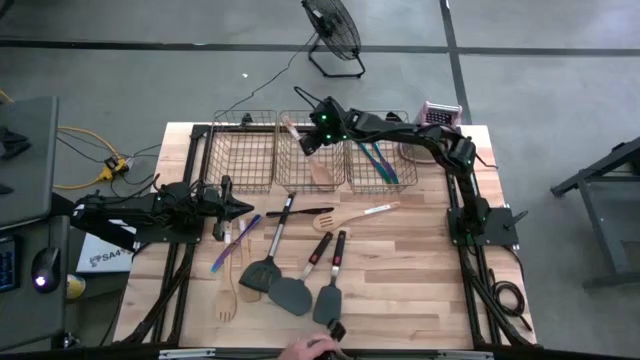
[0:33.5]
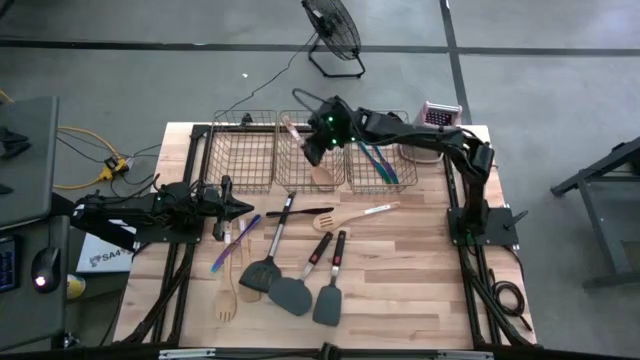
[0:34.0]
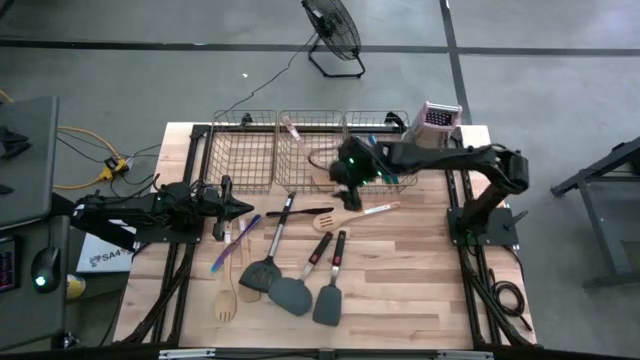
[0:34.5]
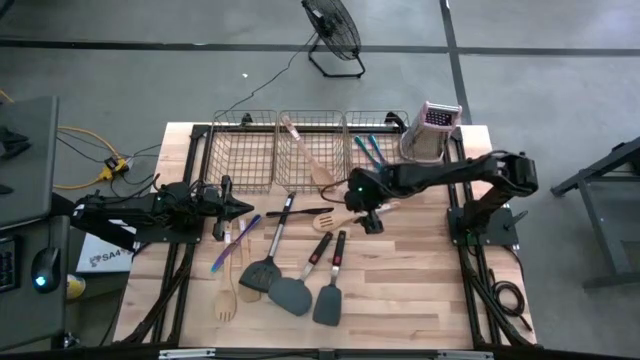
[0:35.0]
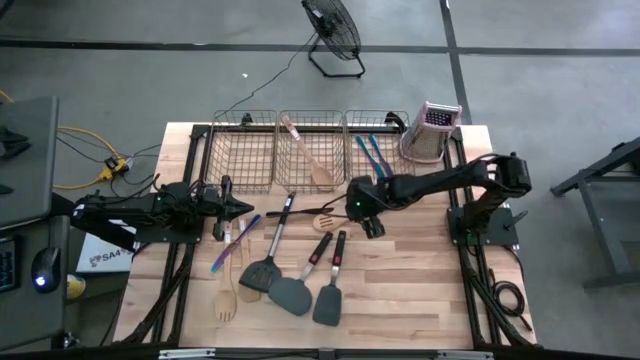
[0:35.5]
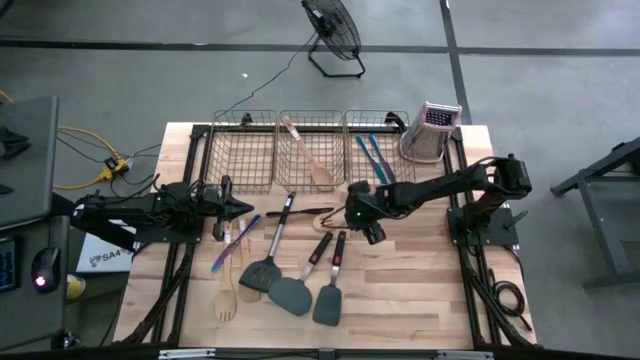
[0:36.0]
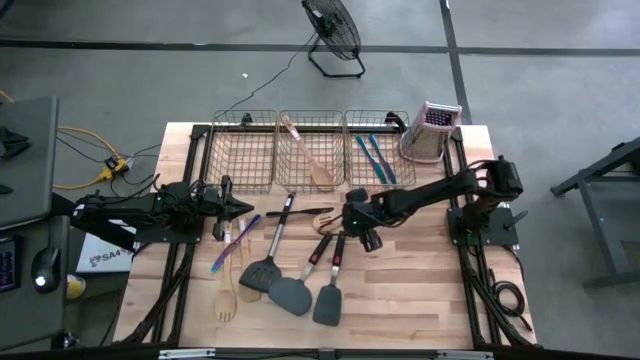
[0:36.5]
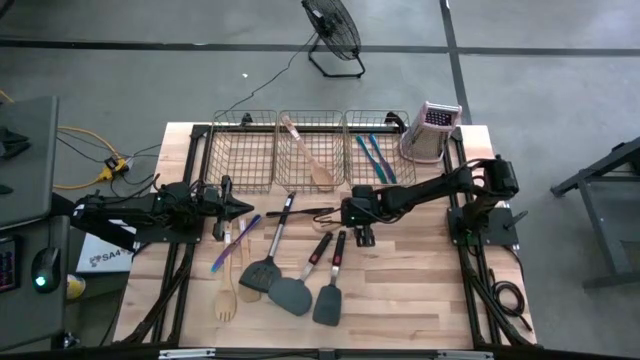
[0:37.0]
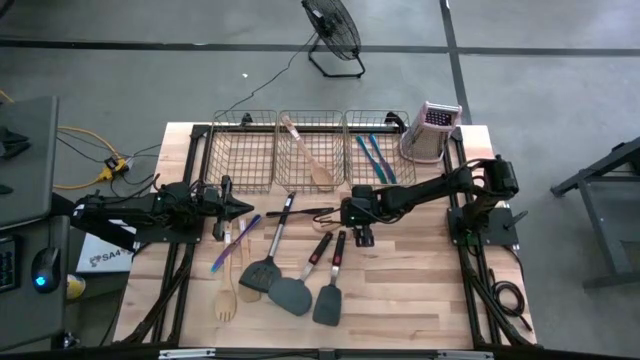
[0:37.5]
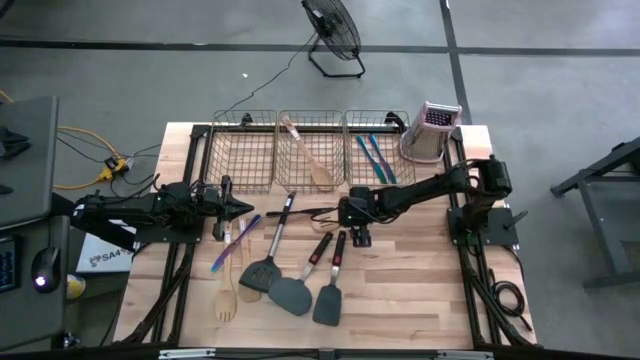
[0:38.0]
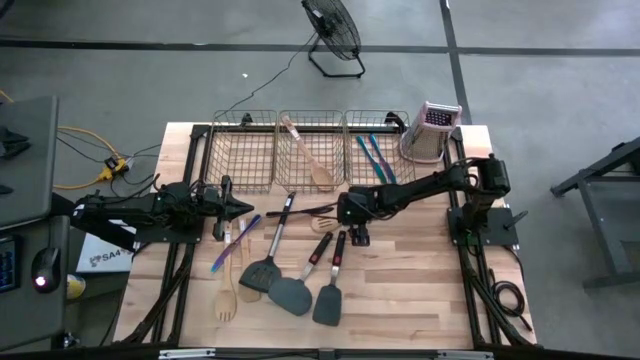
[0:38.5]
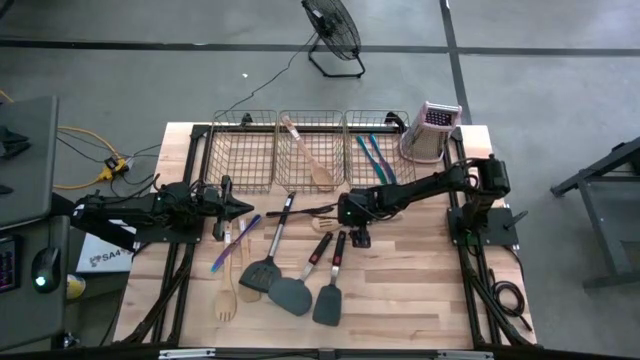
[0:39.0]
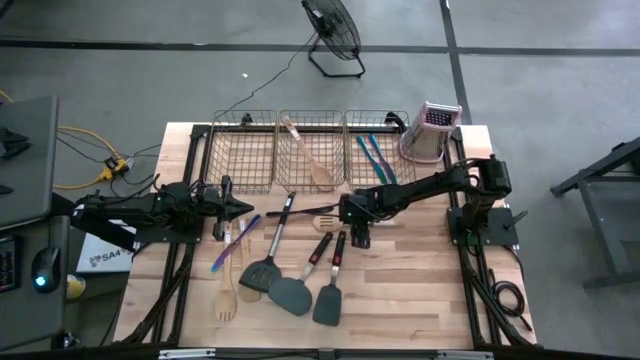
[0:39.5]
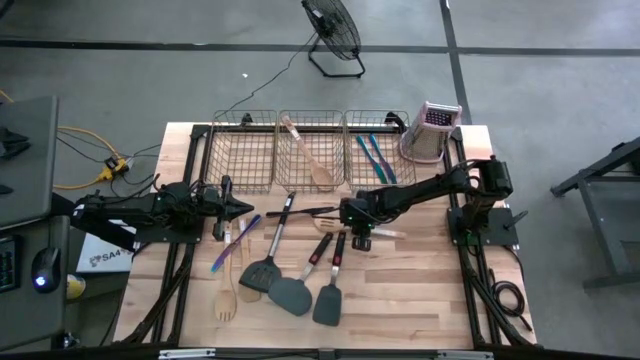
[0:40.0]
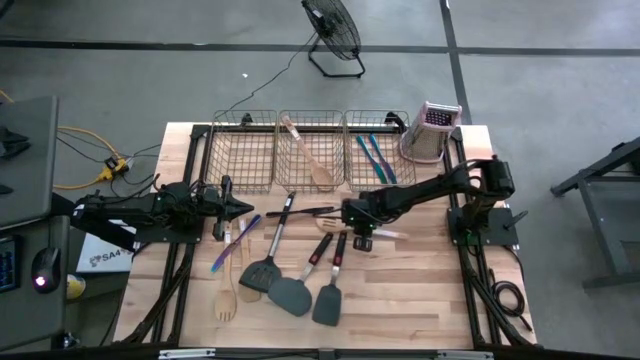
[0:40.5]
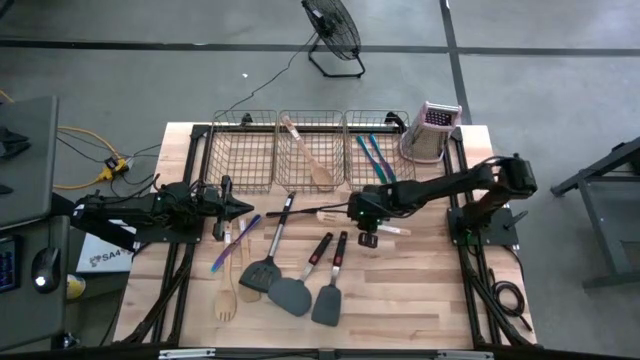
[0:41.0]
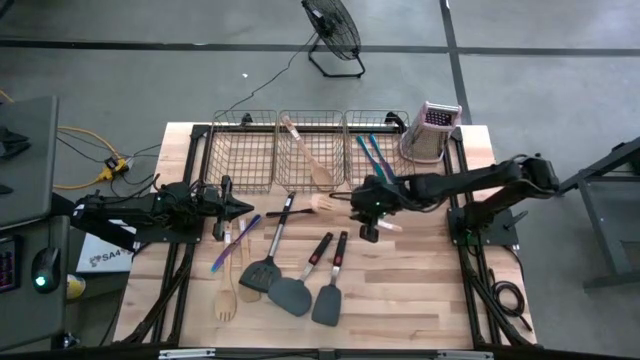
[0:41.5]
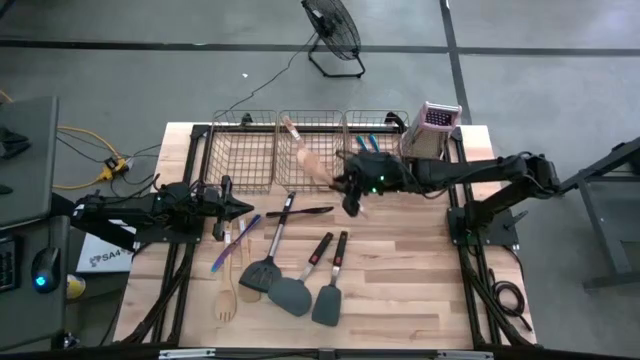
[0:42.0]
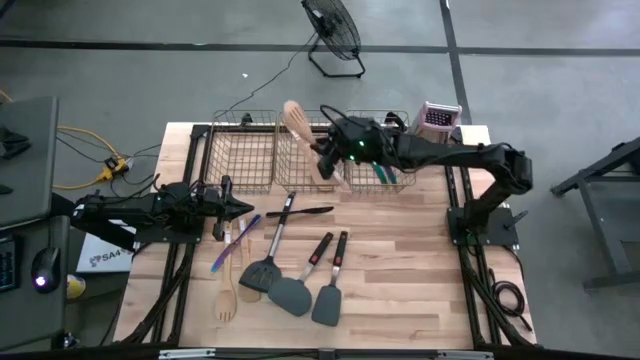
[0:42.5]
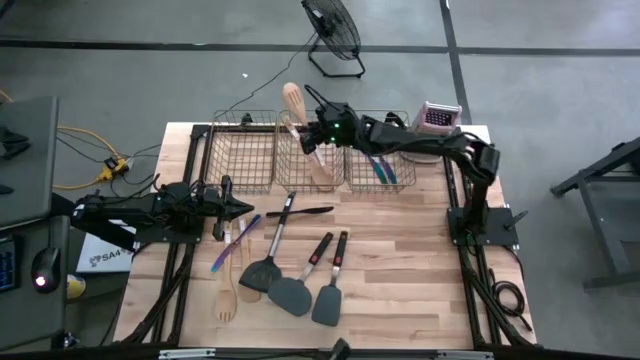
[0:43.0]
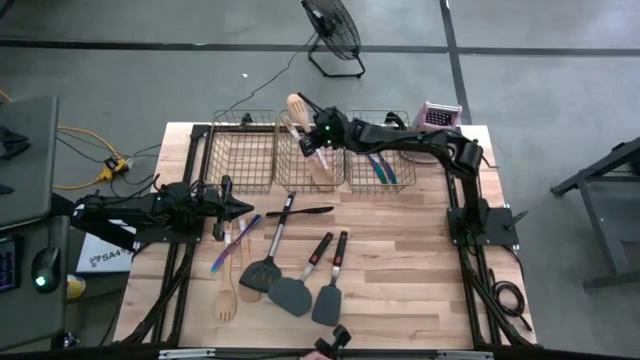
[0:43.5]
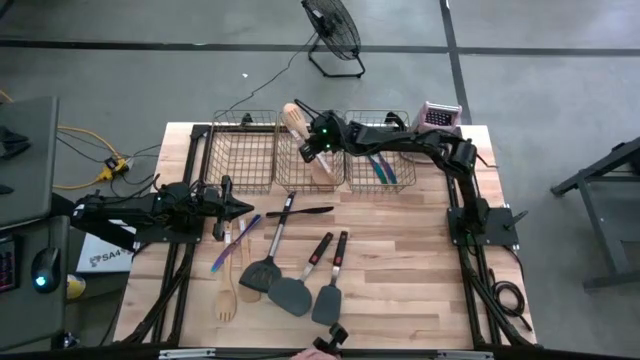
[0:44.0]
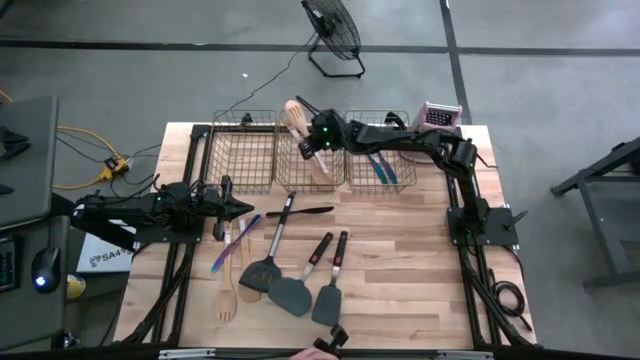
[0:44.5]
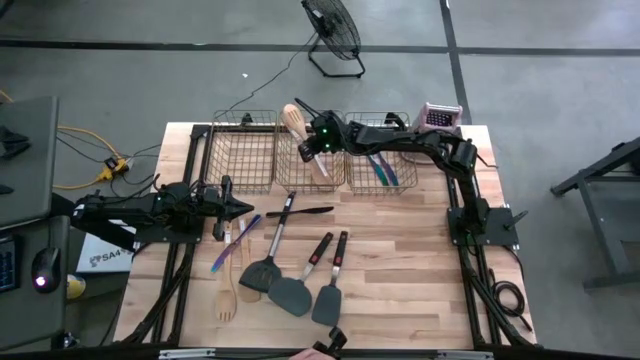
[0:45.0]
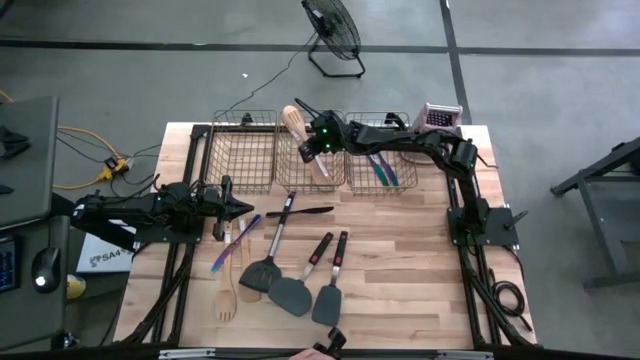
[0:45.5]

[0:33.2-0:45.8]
Task: Pick & Place Kitchen Items
Put the brown serving spoon into the middle wire basket

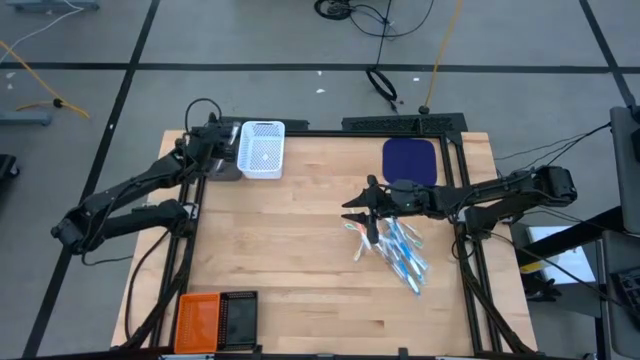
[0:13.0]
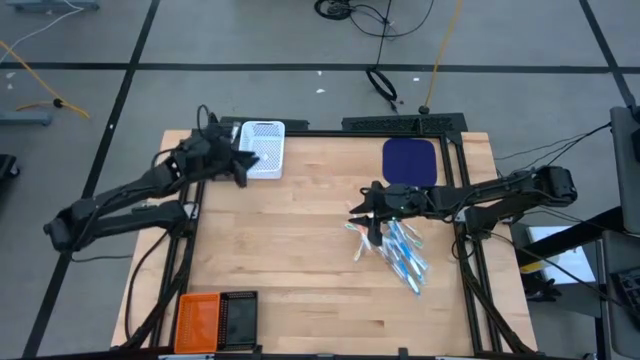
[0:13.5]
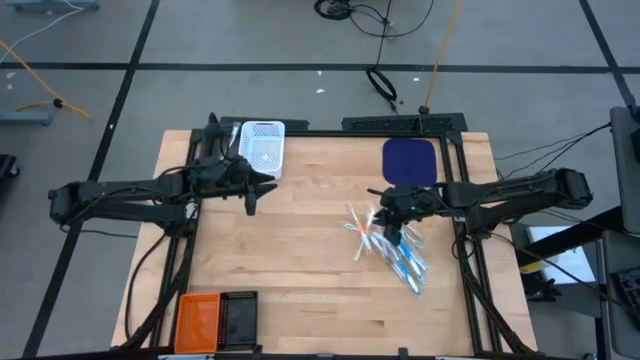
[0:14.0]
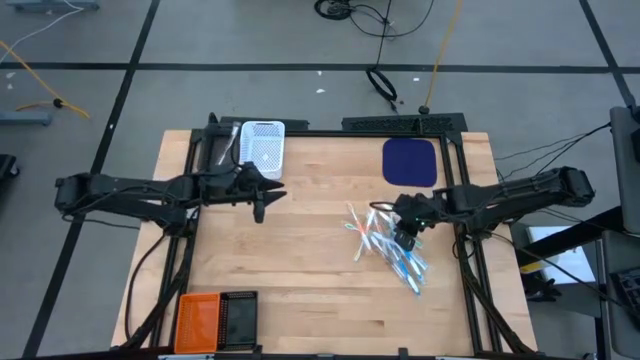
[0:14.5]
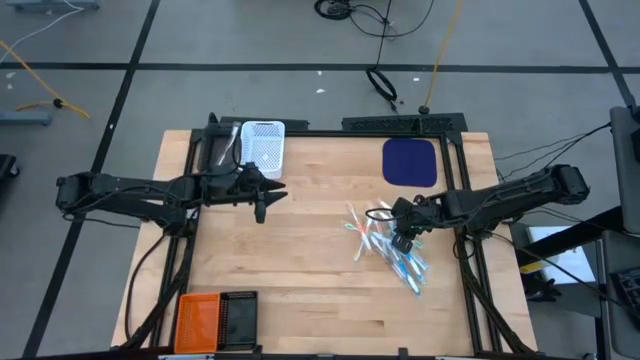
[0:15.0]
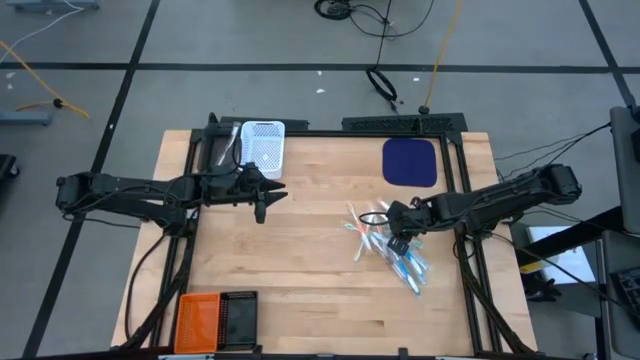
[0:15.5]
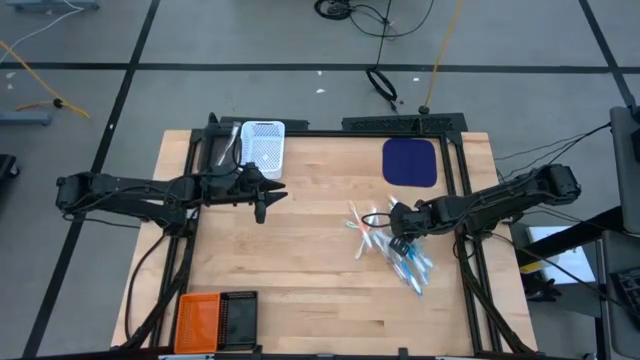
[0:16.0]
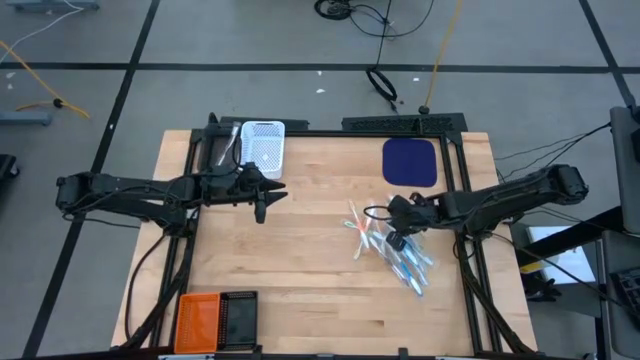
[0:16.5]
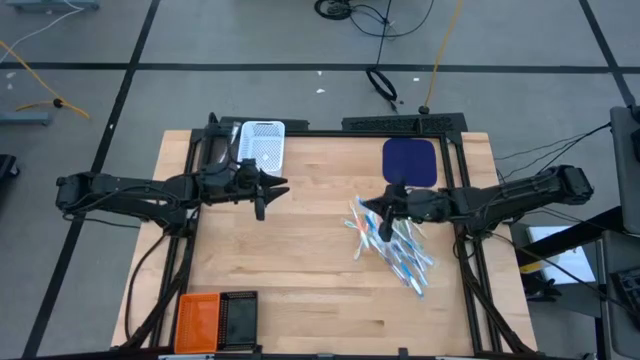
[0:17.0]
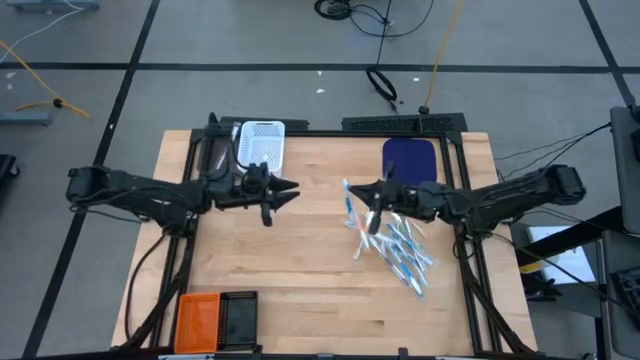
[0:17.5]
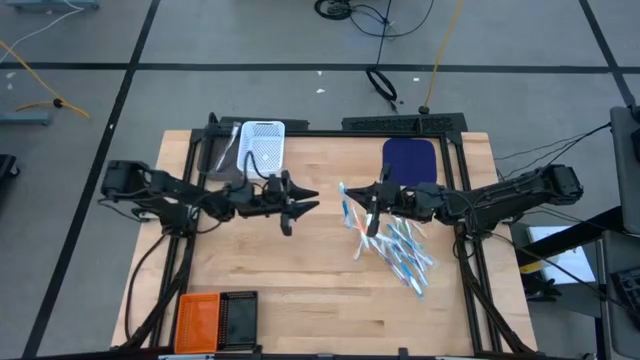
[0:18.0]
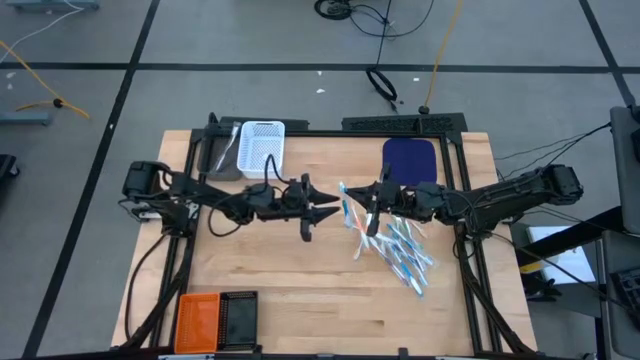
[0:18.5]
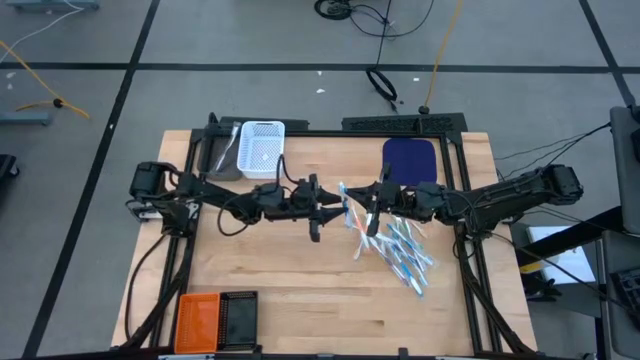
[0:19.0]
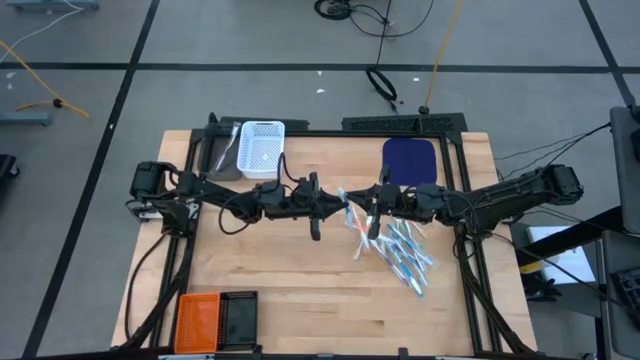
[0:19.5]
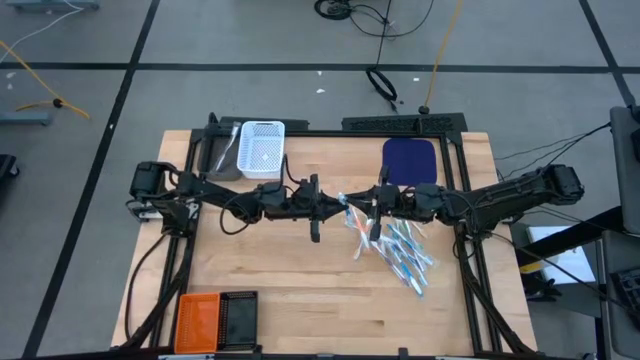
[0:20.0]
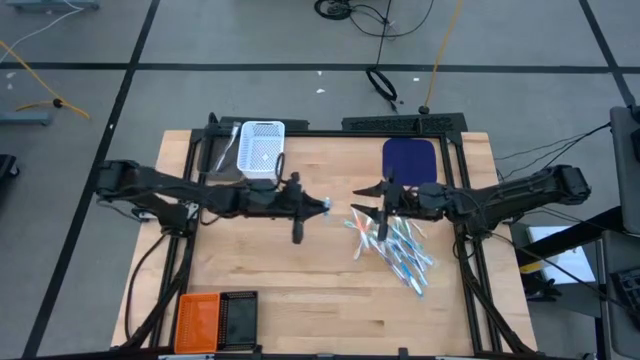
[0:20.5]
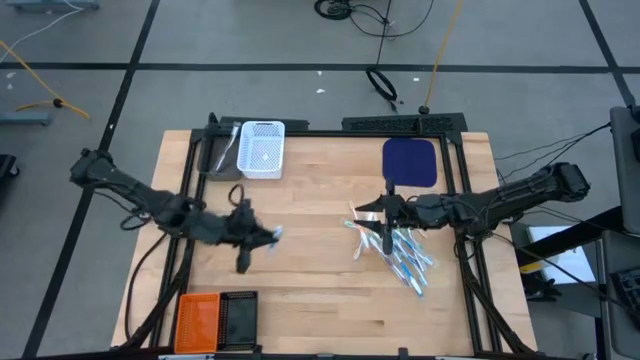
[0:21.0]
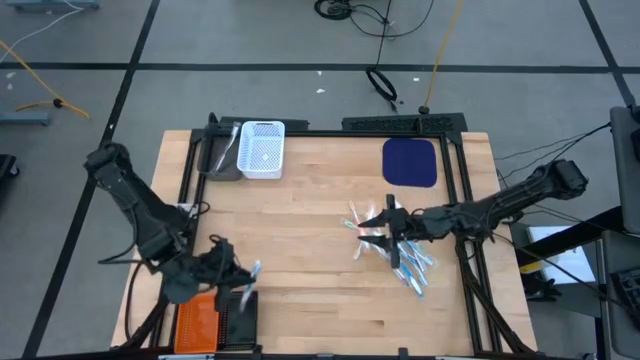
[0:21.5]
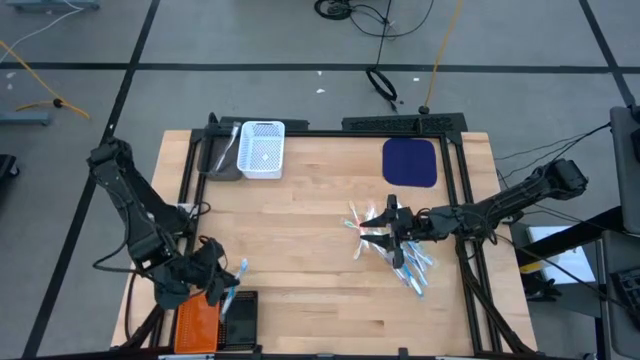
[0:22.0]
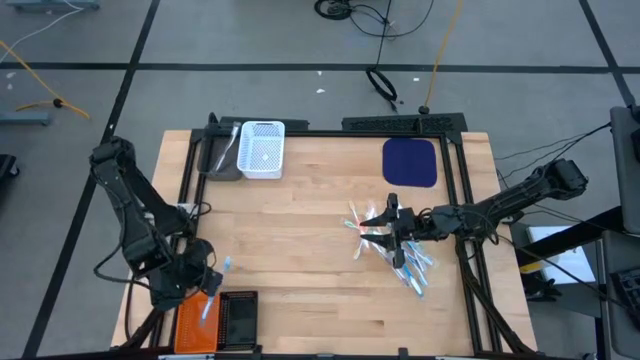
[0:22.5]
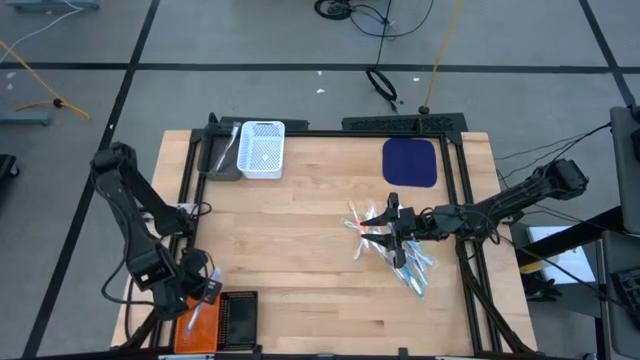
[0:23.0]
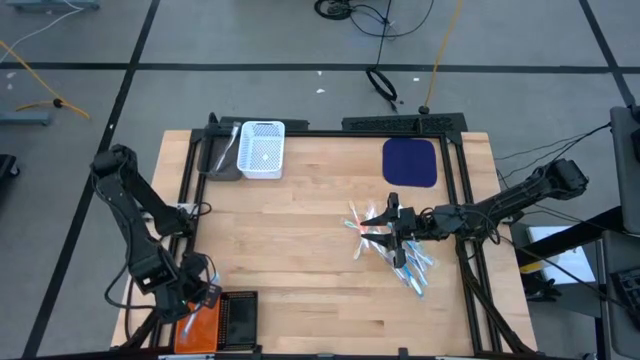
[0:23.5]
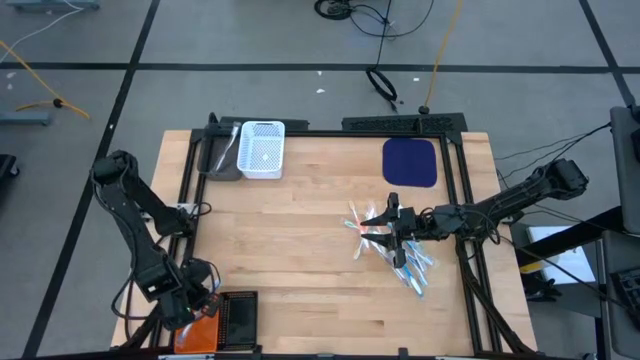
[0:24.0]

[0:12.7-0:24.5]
Task: Pick & Place Toothbrushes
Put the blue toothbrush into the orange bin
